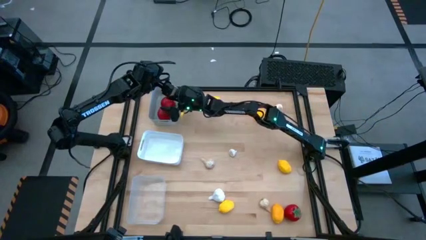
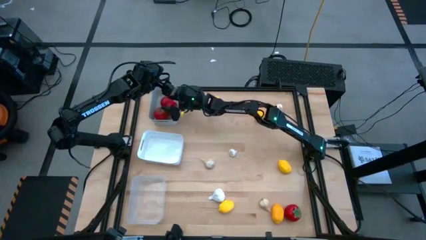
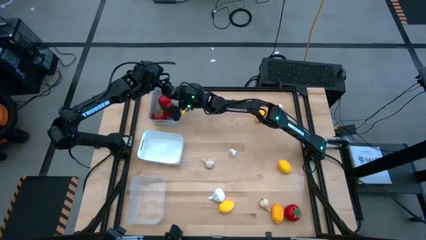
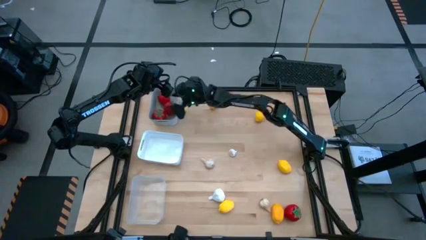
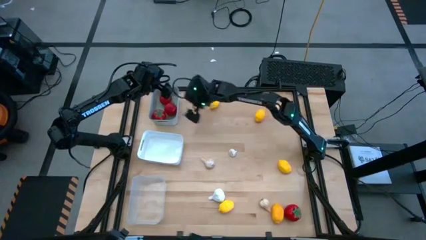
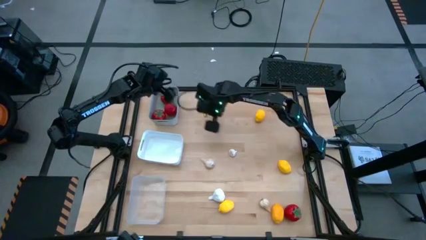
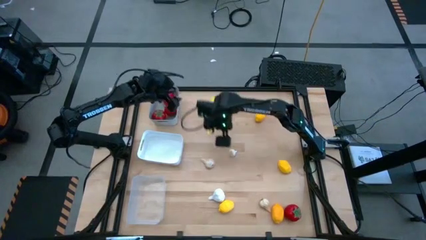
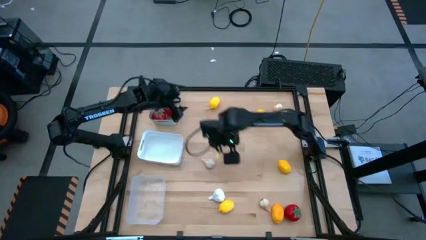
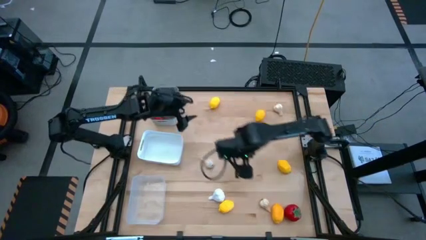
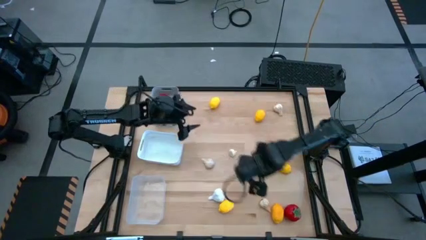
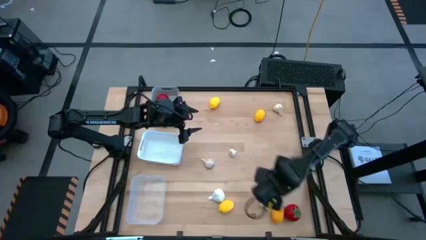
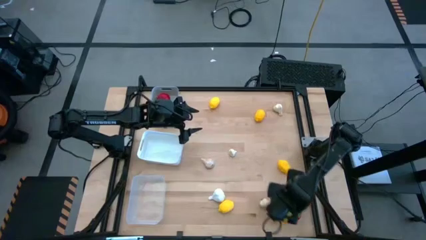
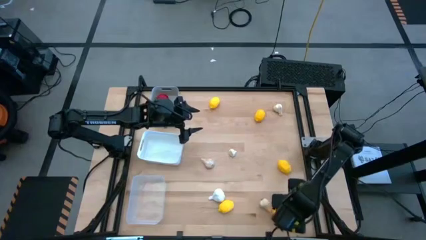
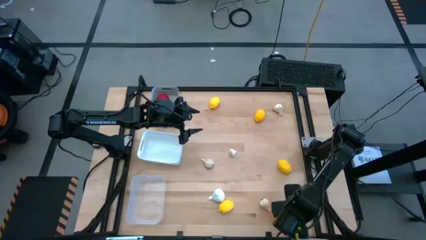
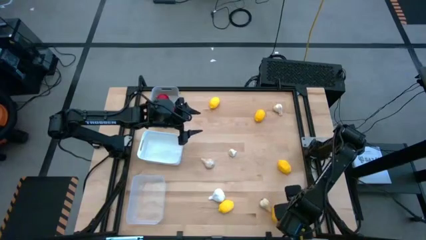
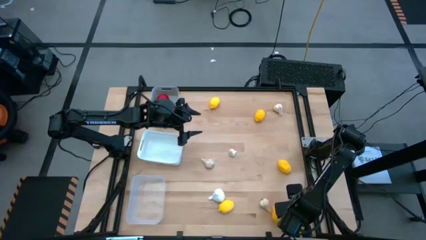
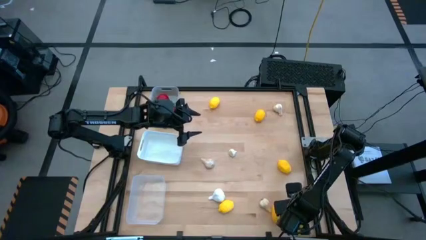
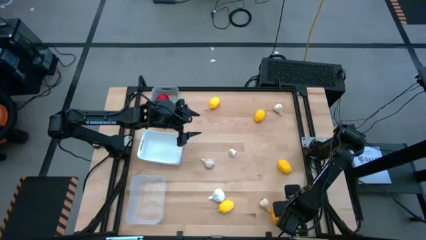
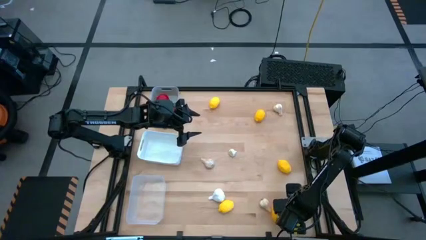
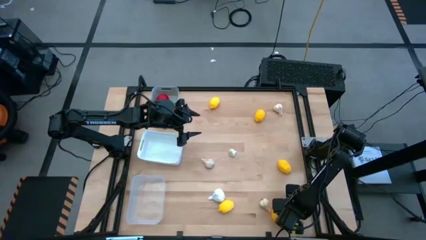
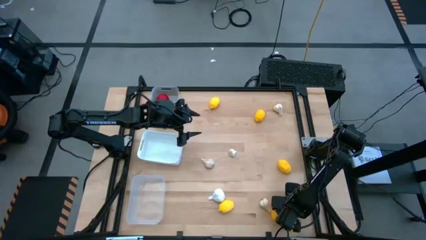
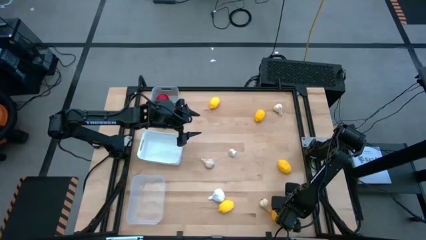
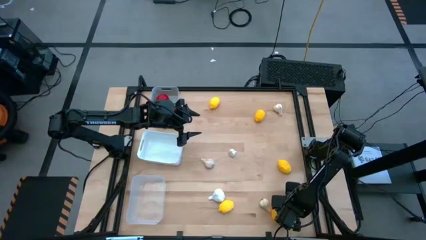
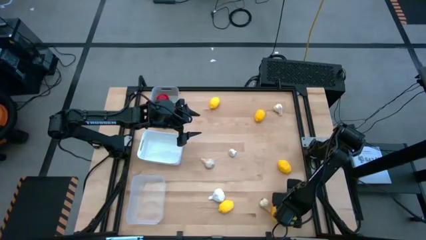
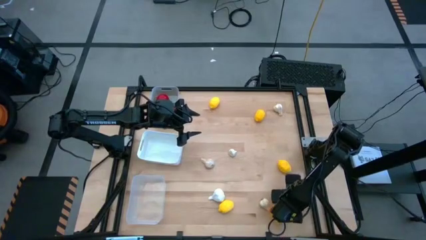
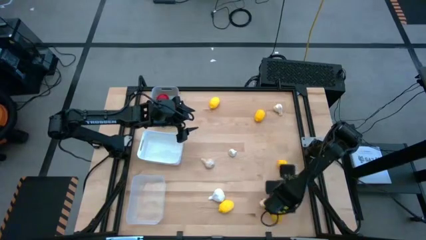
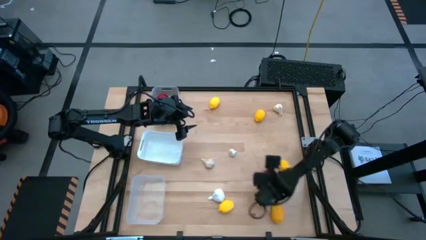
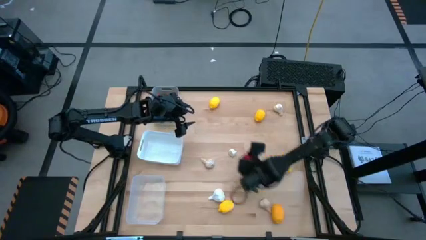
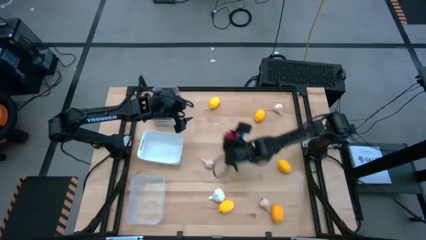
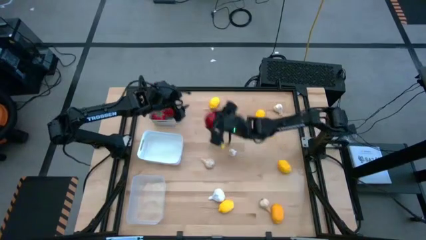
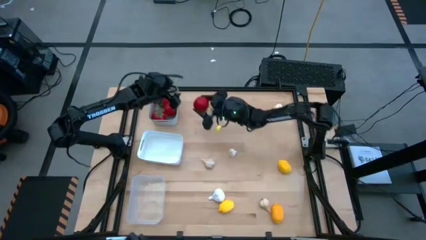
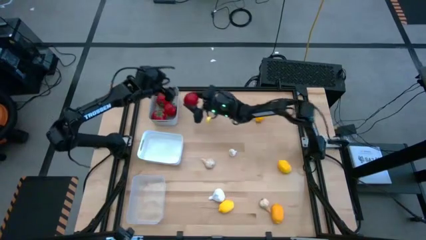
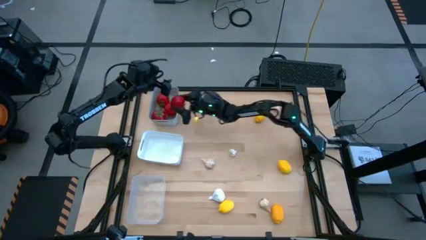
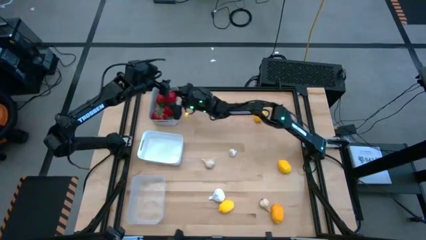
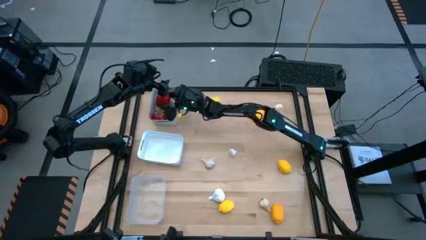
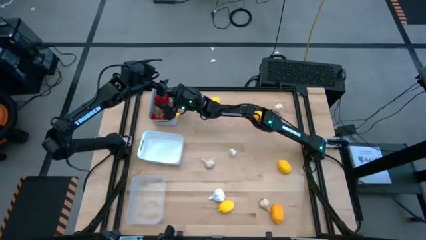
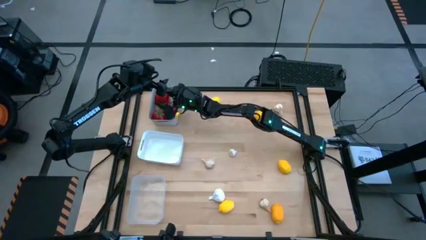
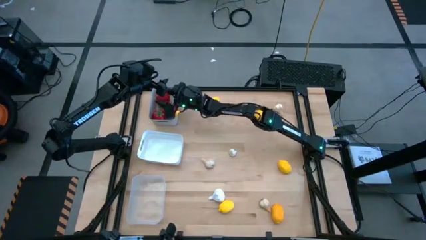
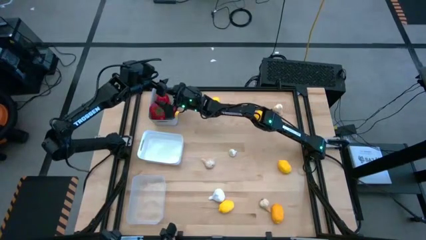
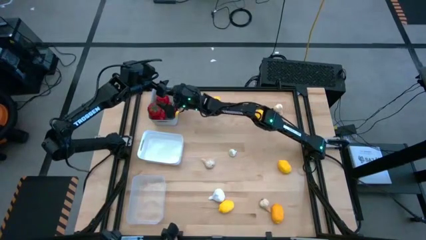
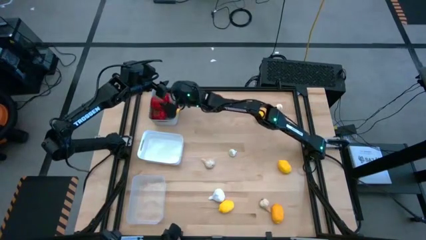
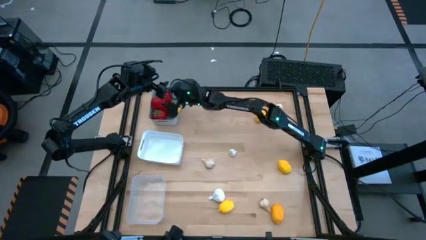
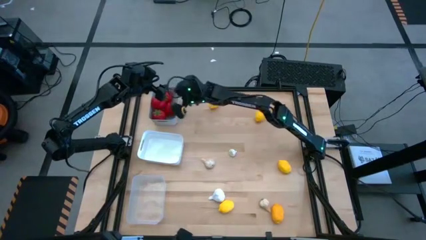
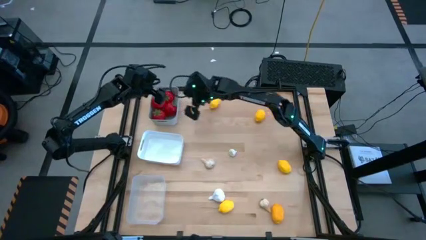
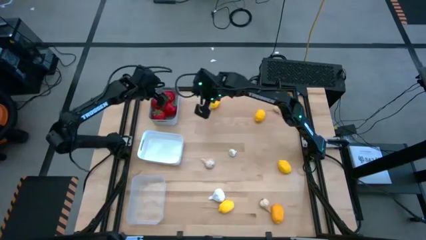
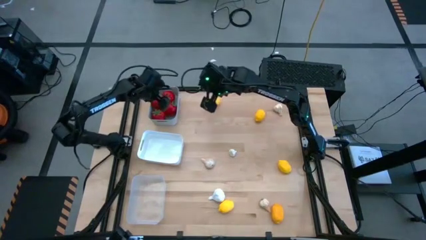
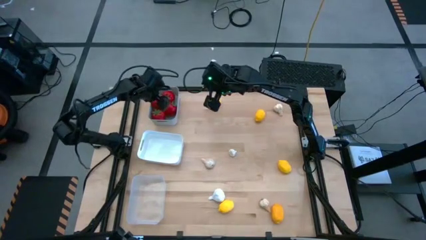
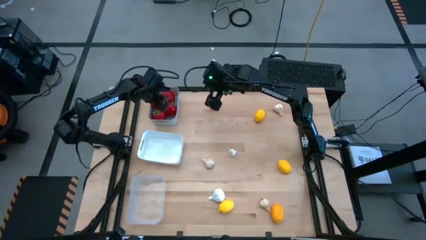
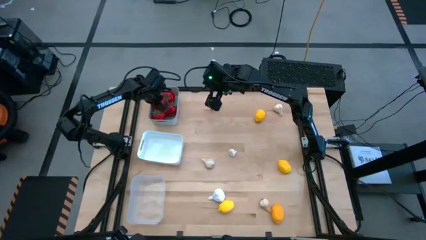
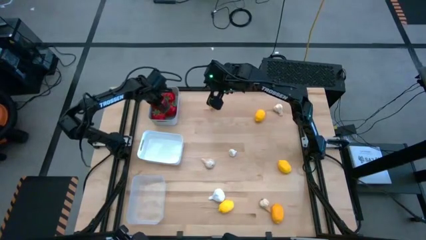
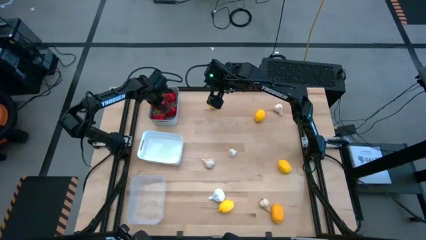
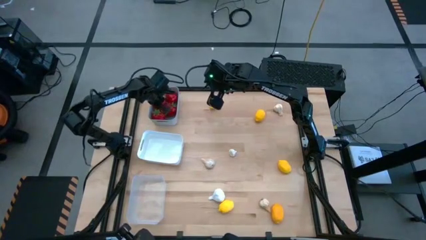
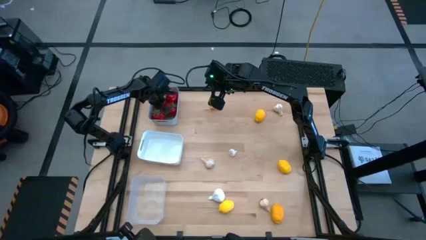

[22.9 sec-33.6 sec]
Task: Sort produce into baskets
Put the red tomato into the gray bin

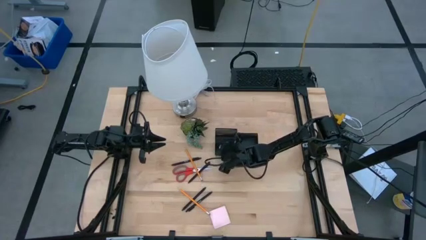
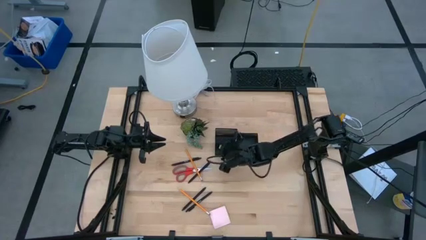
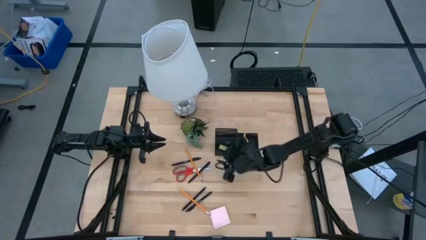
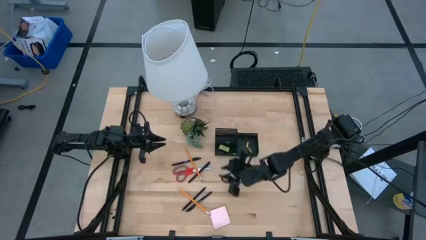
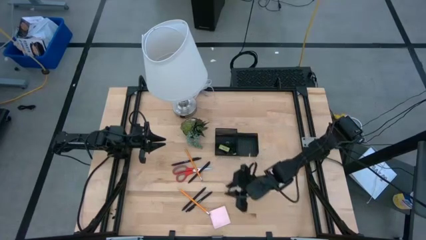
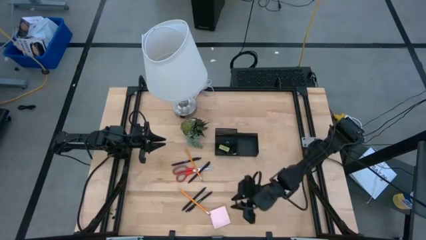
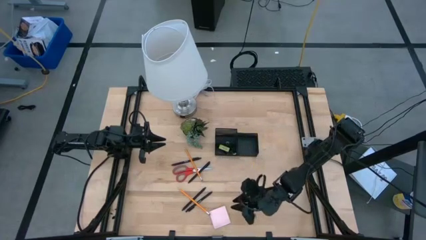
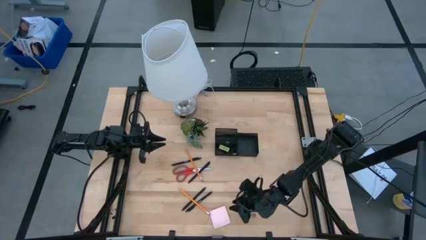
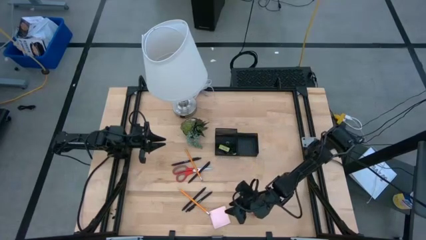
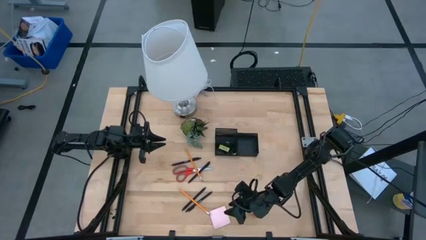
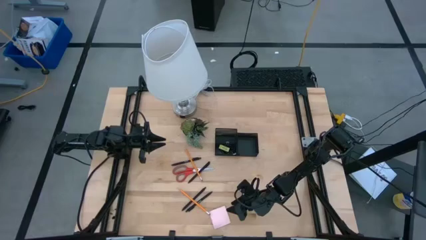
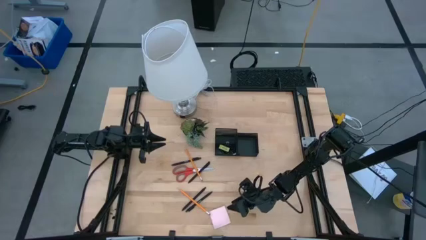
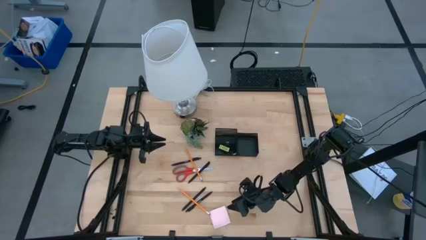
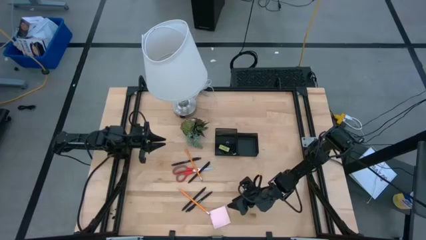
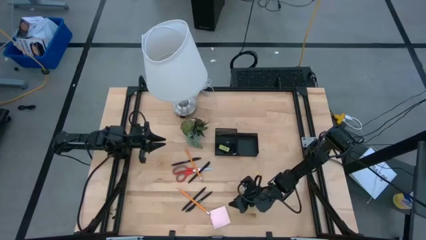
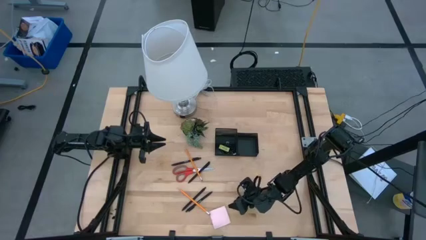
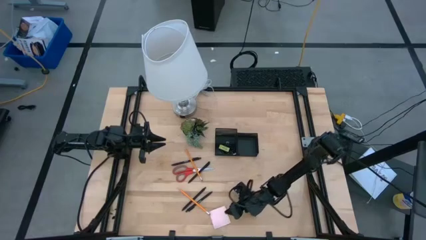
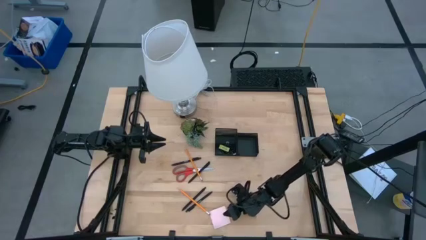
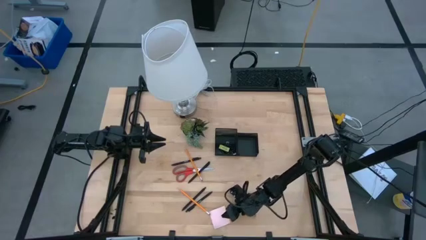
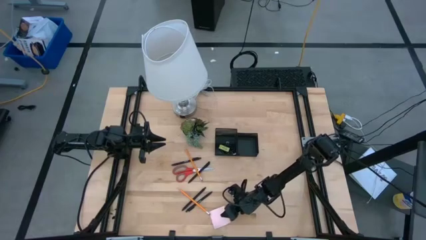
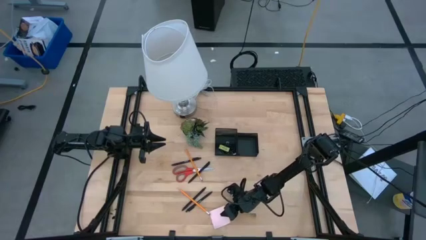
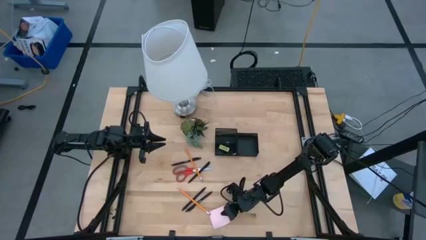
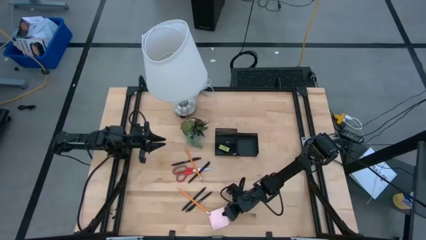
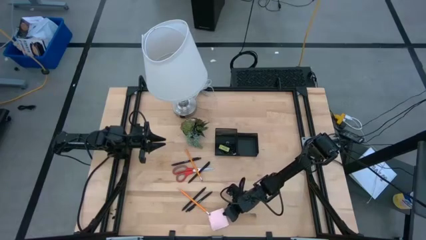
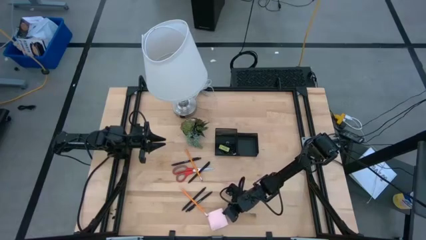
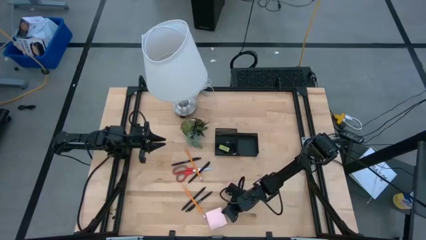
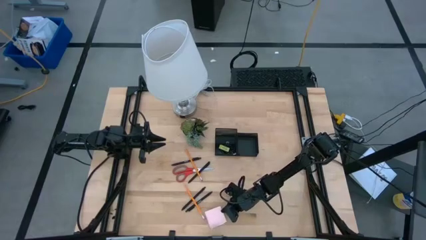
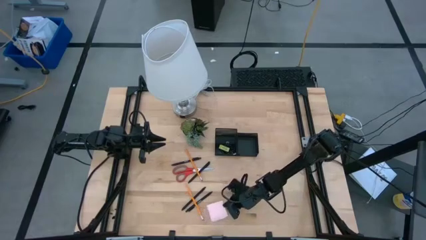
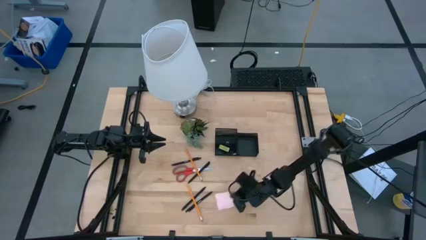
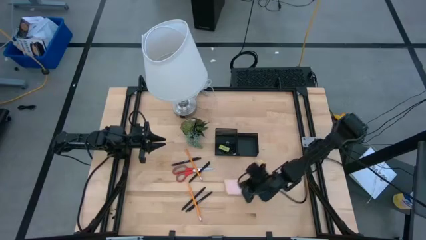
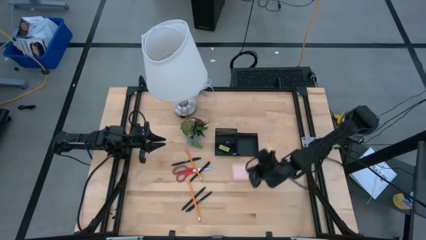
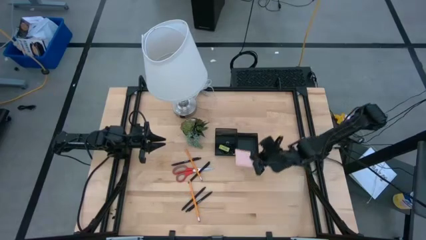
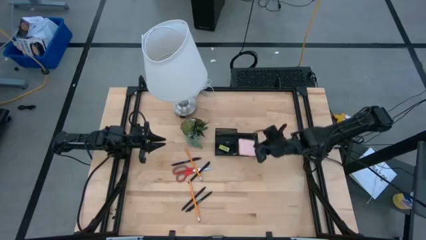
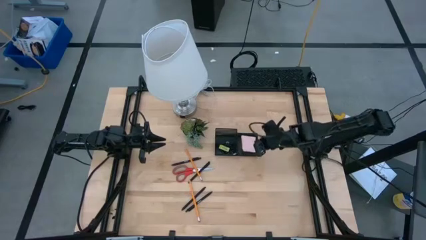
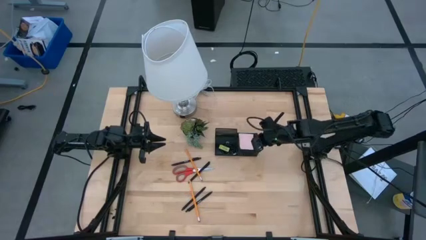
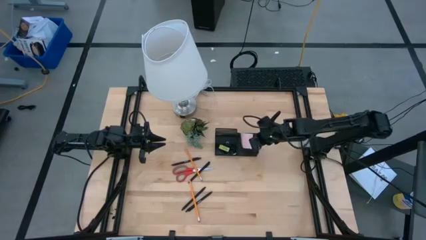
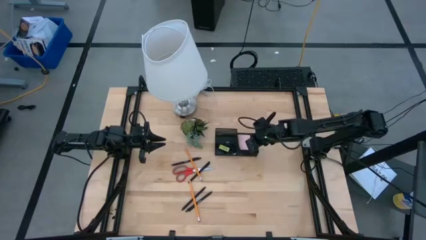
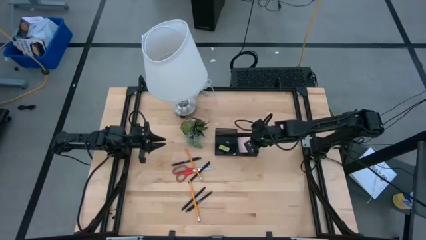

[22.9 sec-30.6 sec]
Task: Pick and place office supplies into organizer
Put the pink sticky notes into the desk organizer
